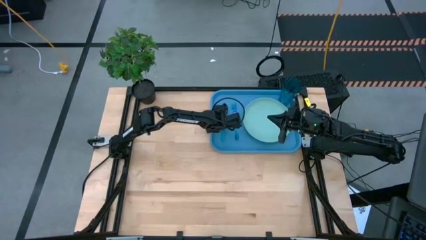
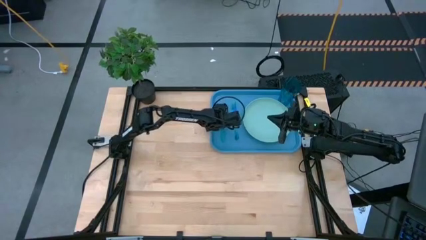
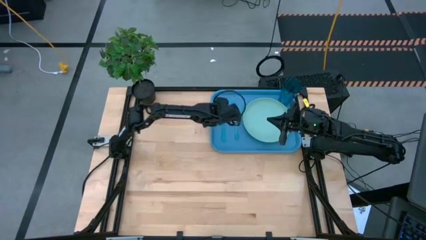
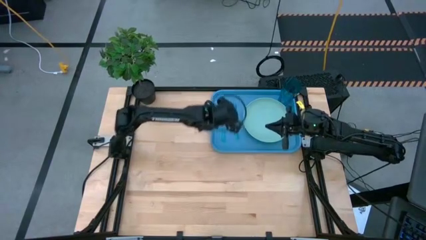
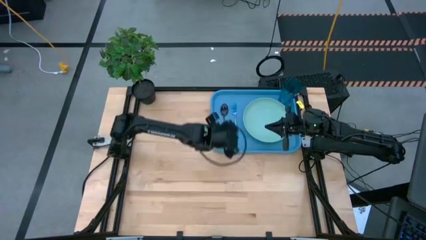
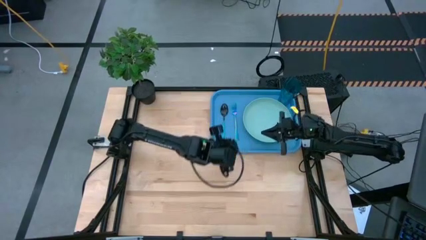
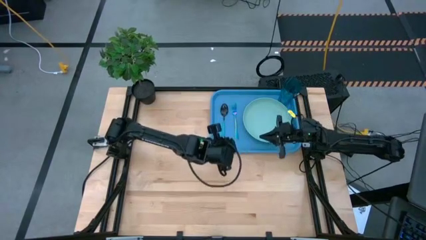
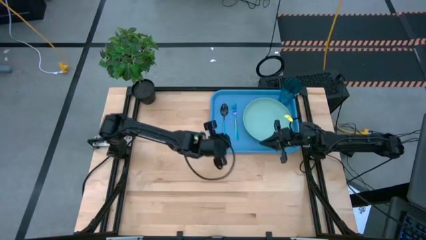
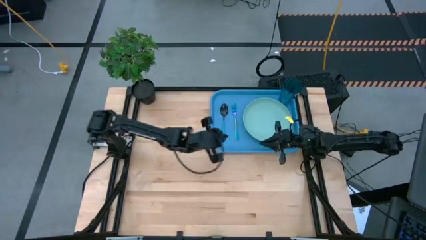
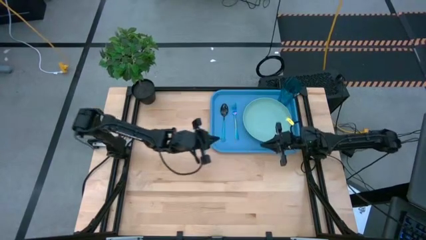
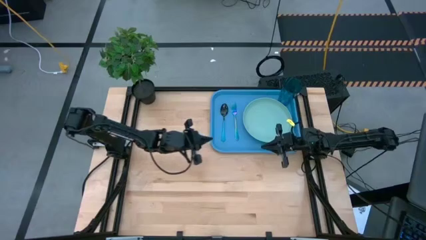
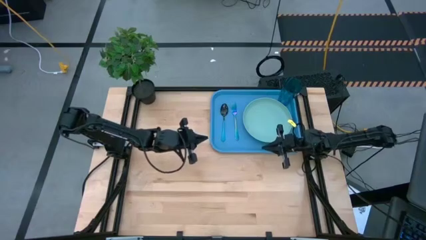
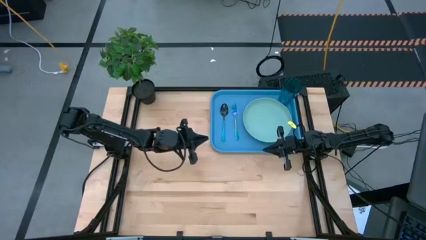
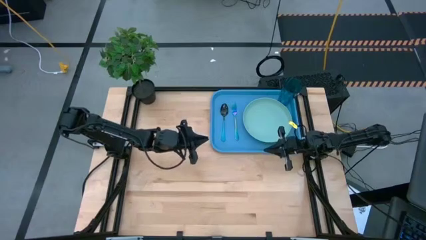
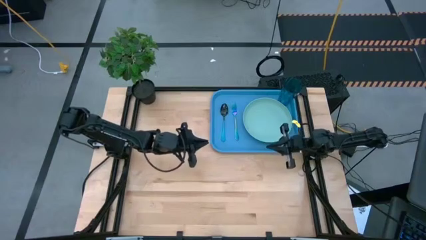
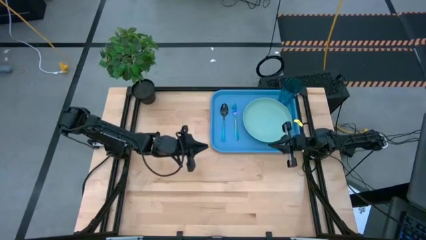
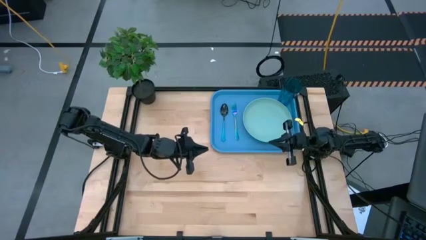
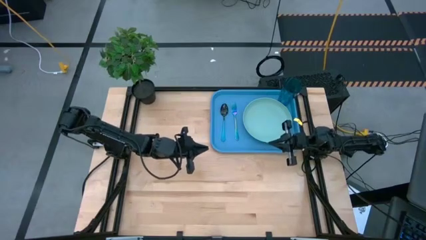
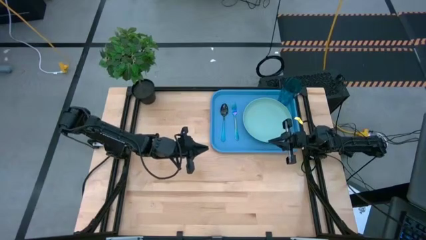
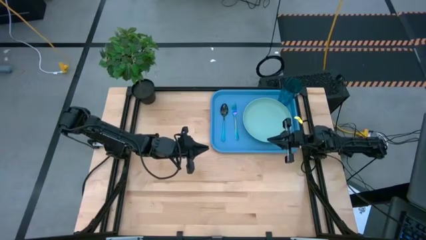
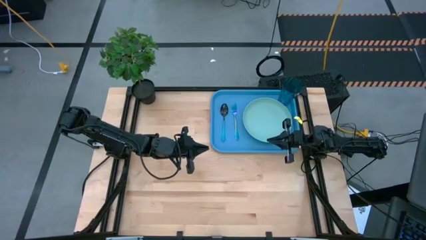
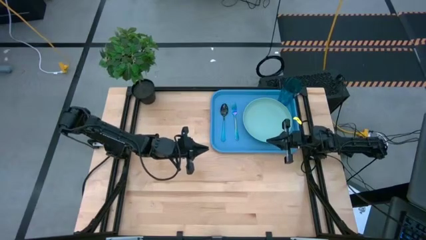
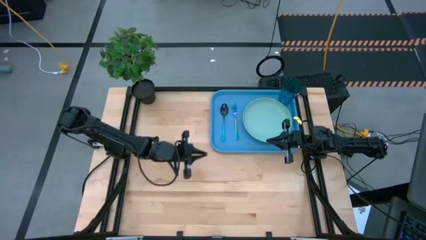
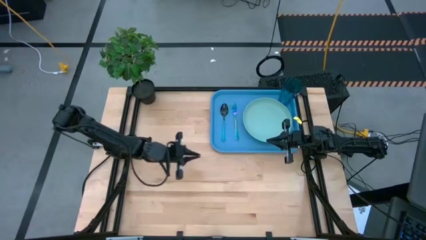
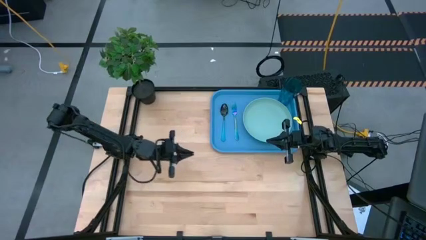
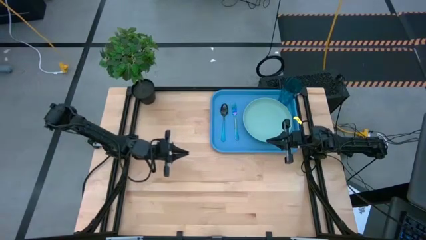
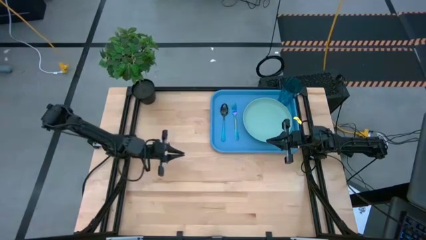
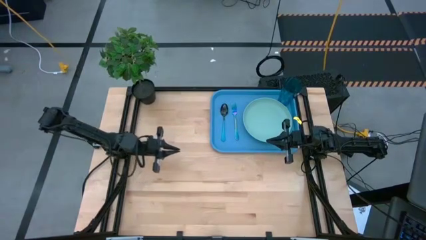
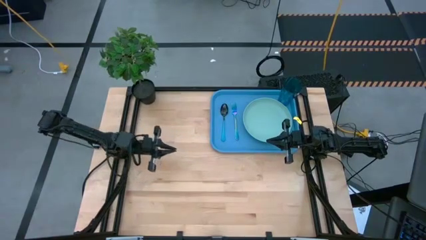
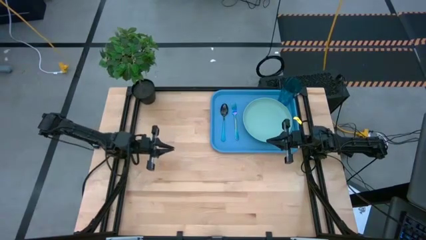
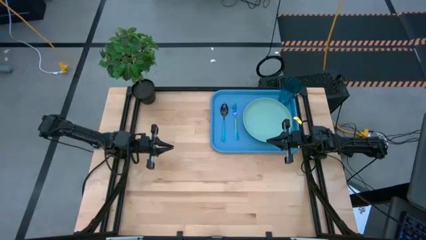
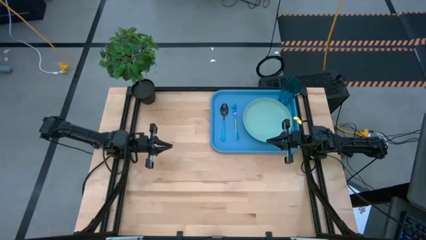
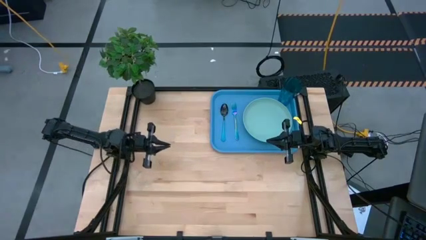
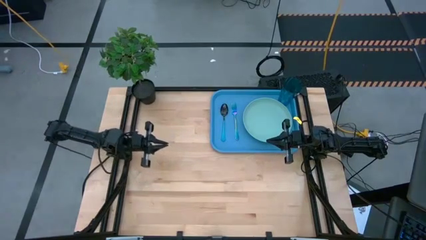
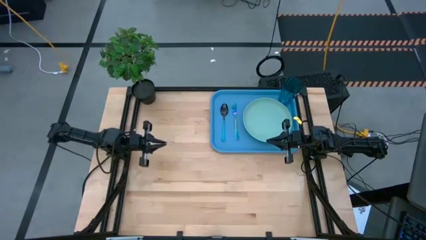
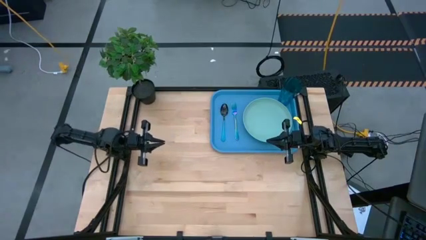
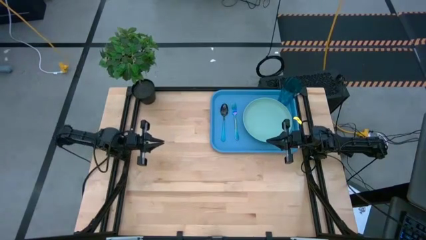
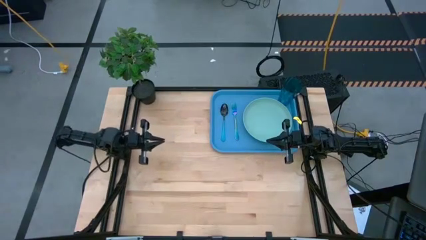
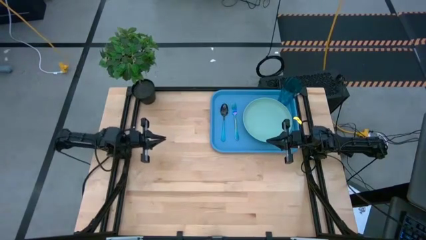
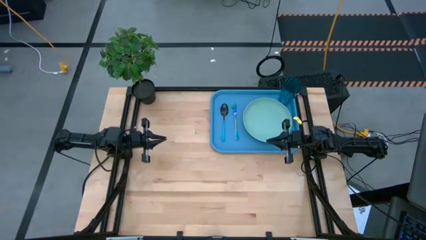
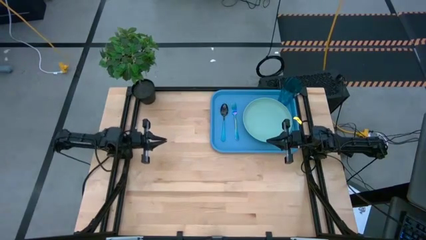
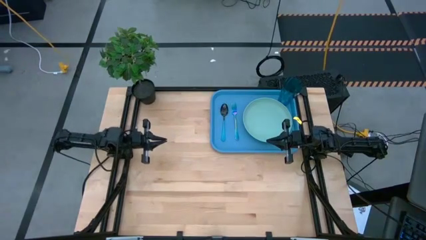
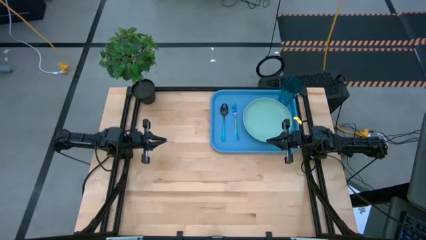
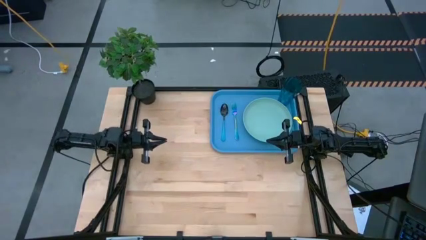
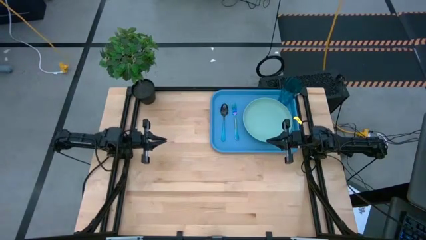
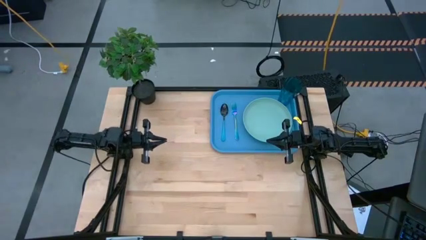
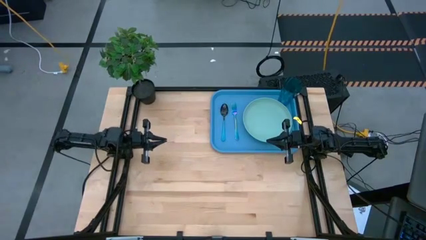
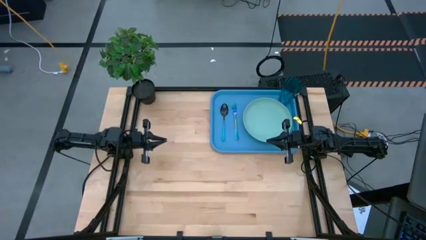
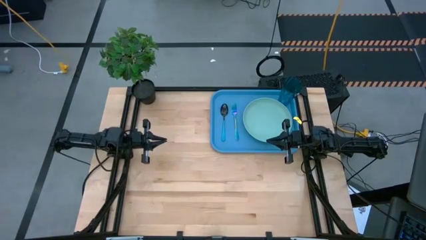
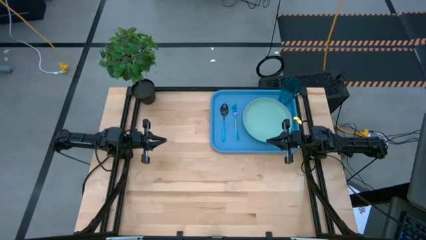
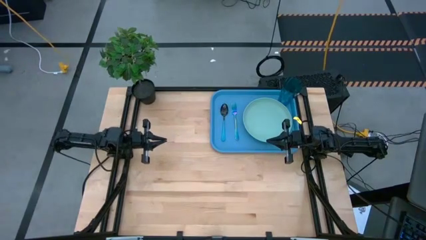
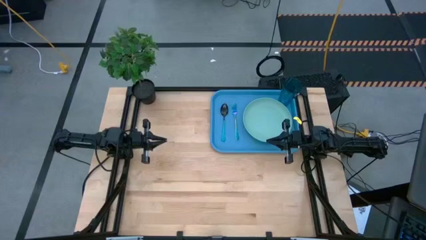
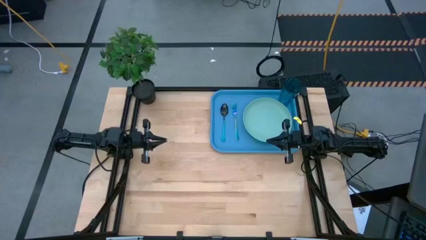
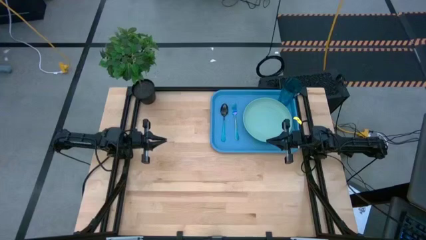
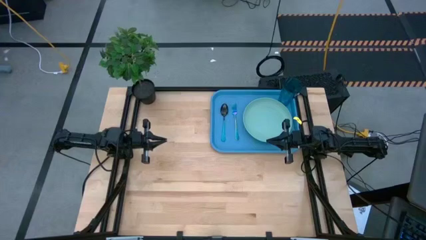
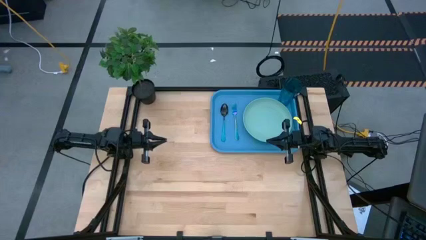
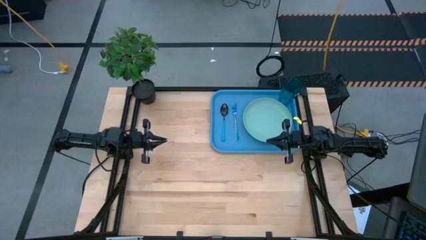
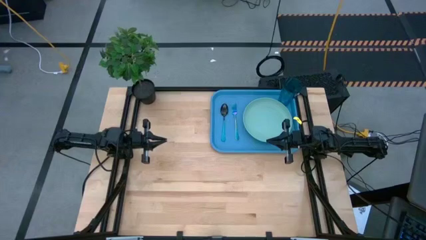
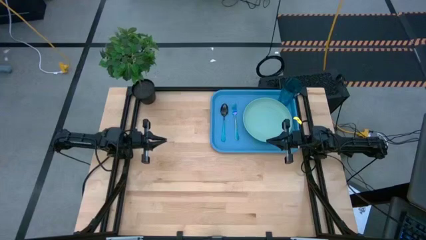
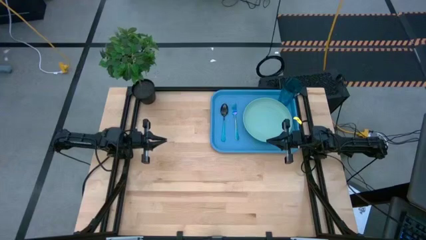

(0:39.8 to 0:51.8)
Task: Pick and place plate/cup/fork/spoon on tray
Return to Home Position
